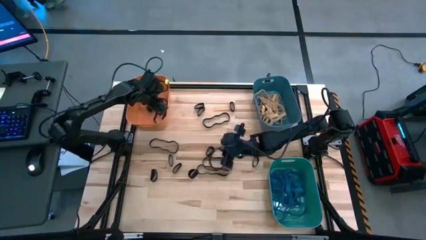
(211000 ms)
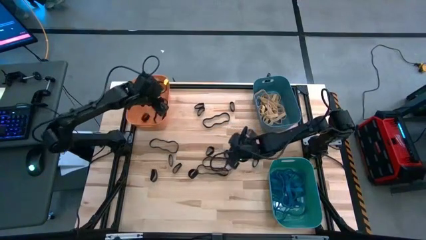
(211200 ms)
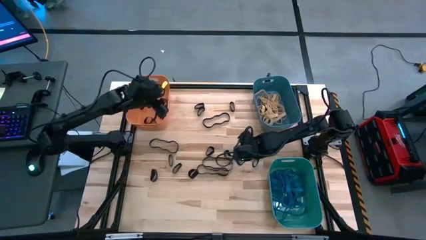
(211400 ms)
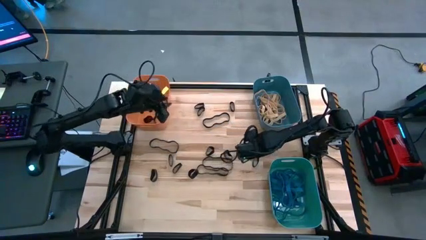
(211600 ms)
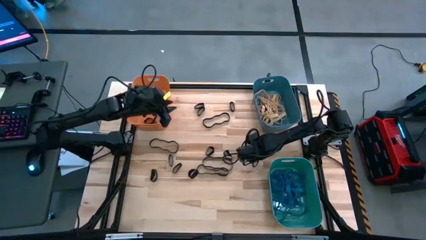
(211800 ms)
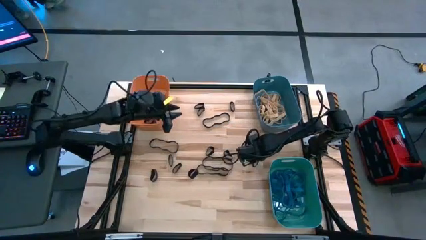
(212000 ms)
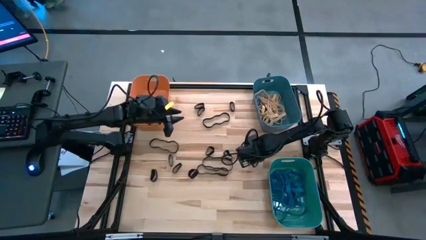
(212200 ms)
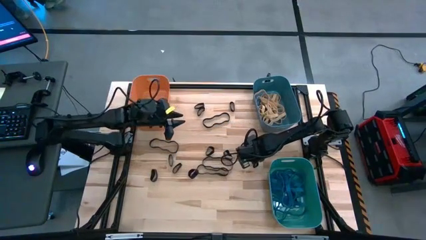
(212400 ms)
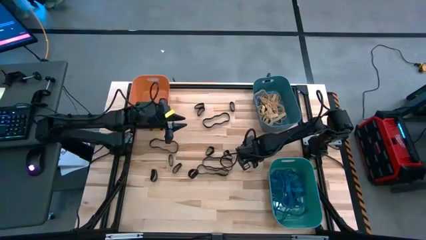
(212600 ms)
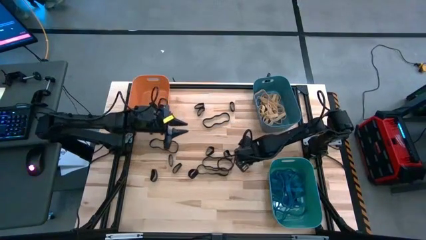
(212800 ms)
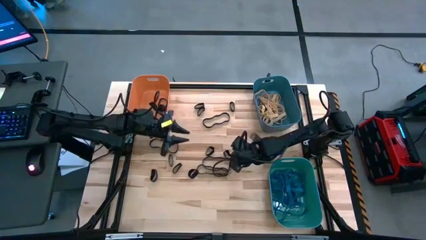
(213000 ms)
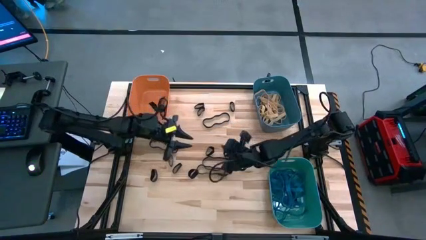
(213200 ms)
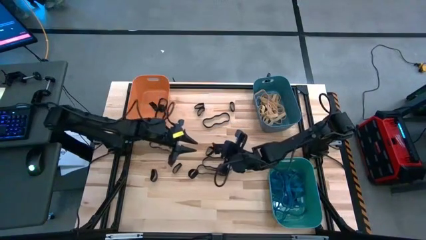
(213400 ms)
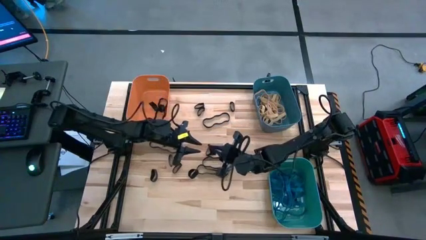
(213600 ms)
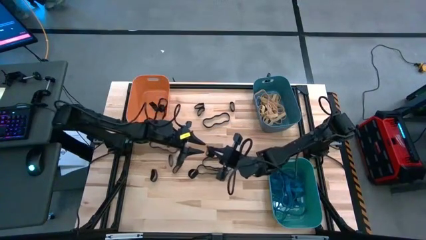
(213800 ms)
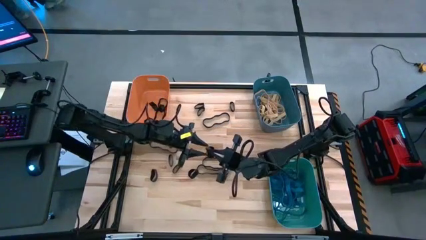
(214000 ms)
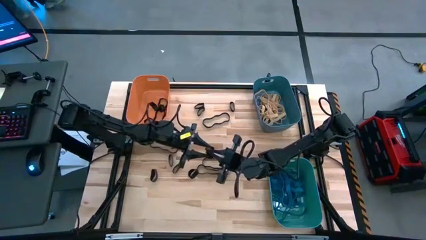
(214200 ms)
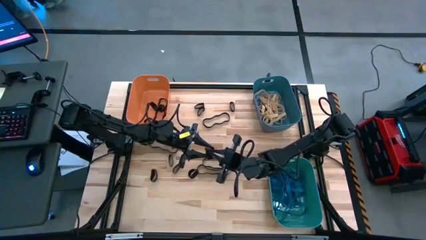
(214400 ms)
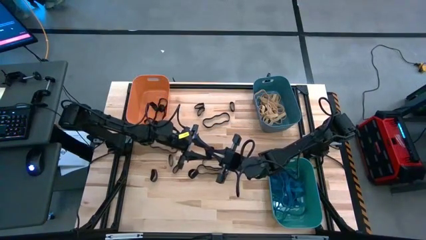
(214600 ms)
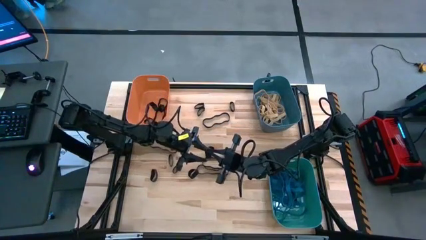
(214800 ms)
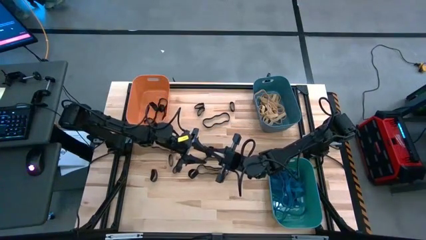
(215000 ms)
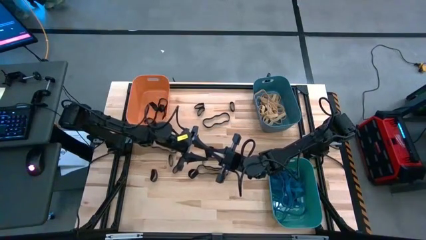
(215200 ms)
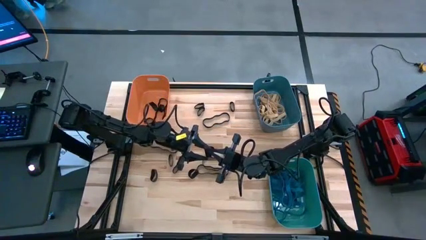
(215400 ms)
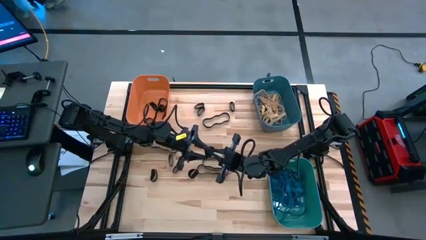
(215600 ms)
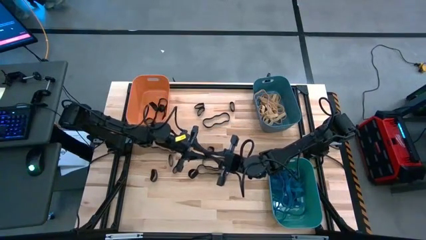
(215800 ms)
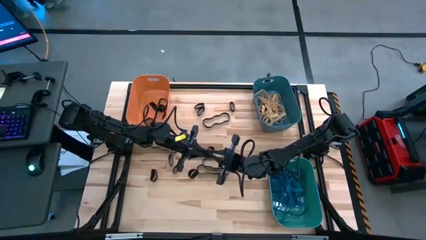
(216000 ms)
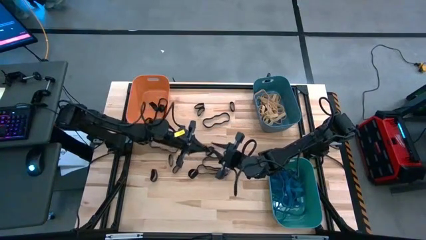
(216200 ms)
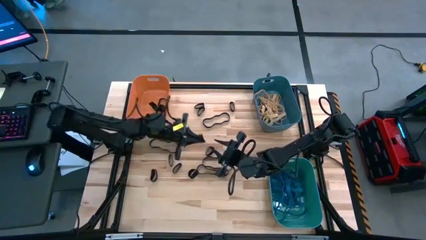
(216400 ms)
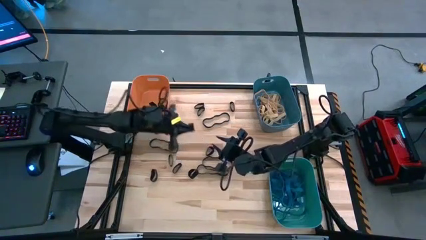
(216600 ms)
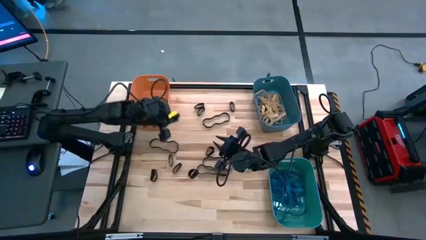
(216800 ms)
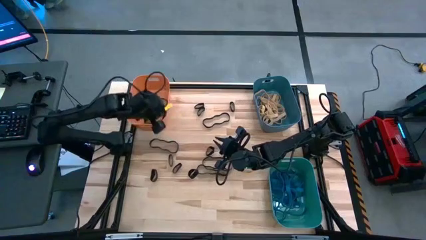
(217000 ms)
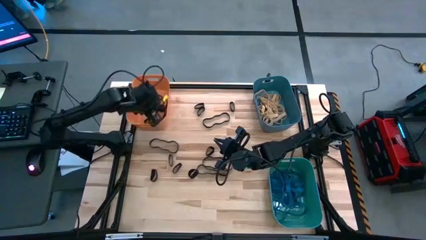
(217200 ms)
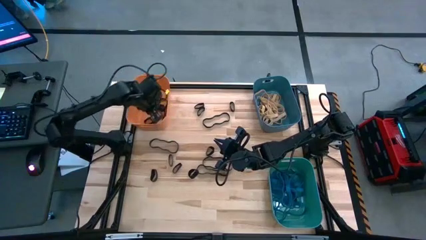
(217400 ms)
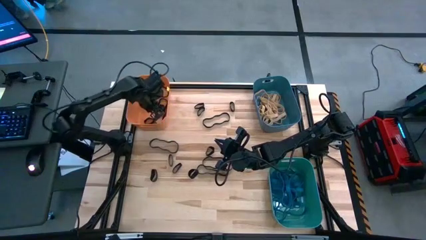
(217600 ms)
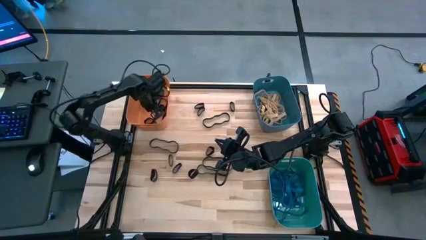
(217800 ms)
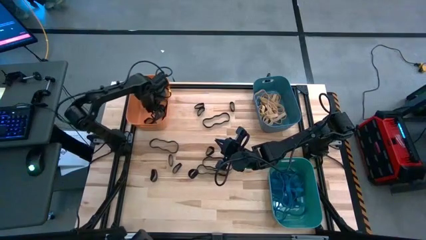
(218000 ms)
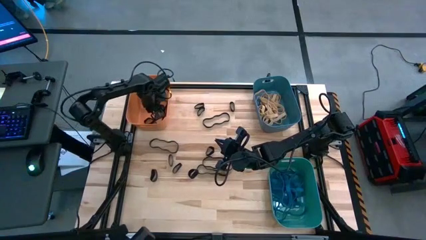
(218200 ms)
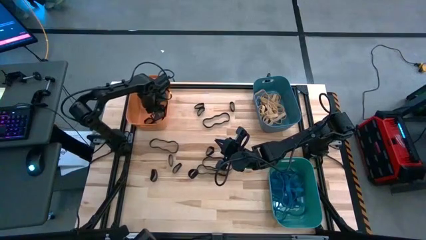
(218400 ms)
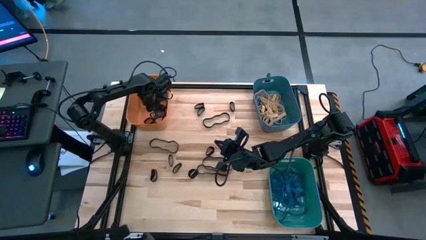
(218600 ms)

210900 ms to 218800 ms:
Task: Sort rubber bands into baskets
Put the black rubber band into the orange bin

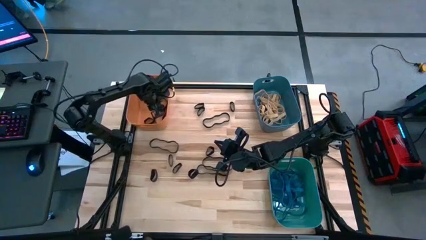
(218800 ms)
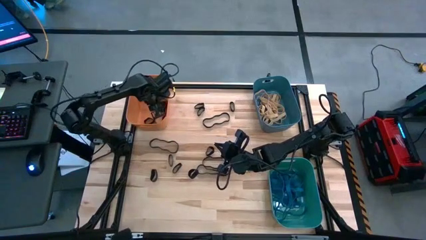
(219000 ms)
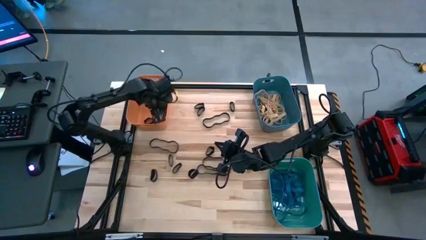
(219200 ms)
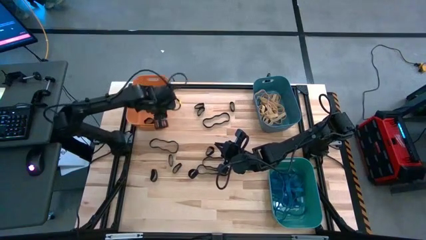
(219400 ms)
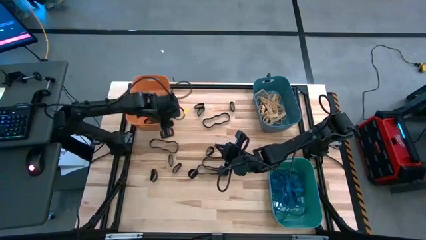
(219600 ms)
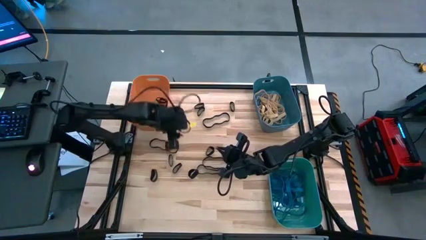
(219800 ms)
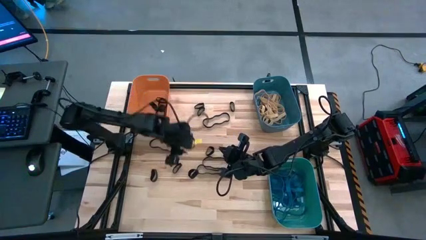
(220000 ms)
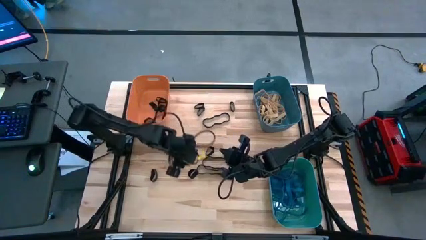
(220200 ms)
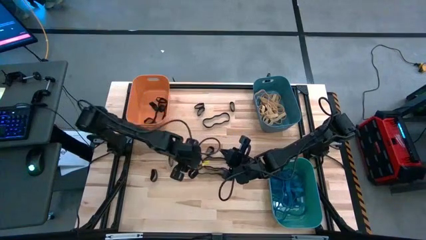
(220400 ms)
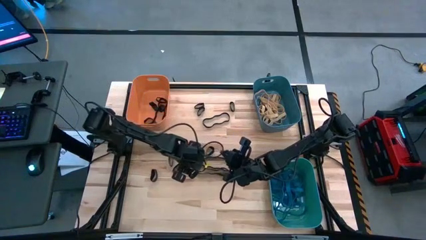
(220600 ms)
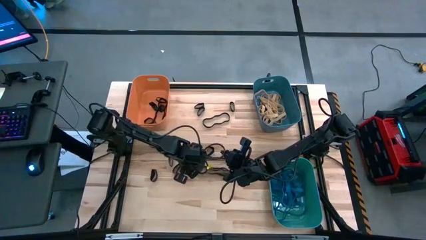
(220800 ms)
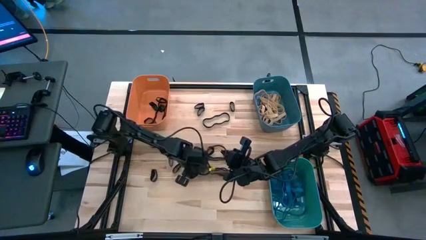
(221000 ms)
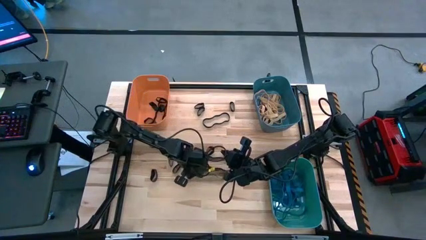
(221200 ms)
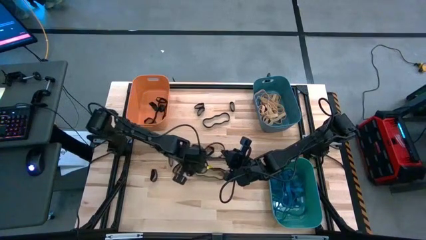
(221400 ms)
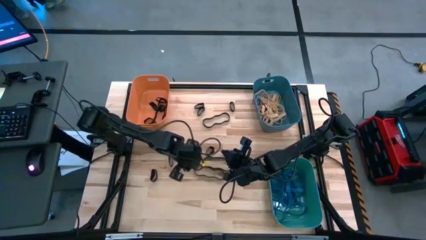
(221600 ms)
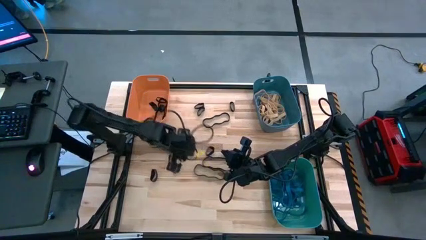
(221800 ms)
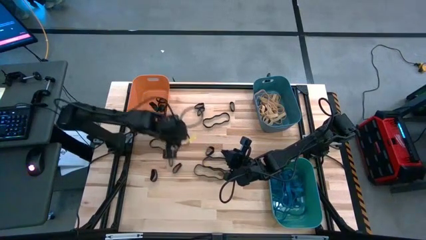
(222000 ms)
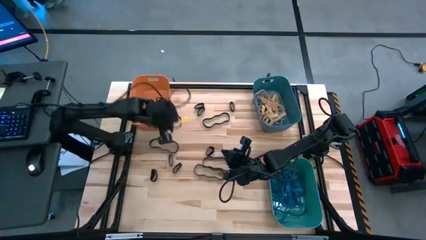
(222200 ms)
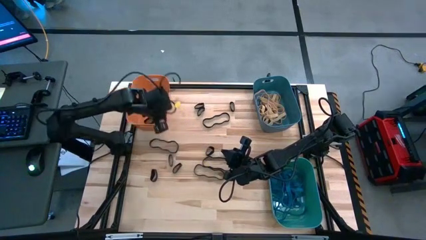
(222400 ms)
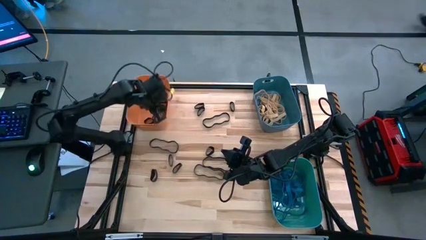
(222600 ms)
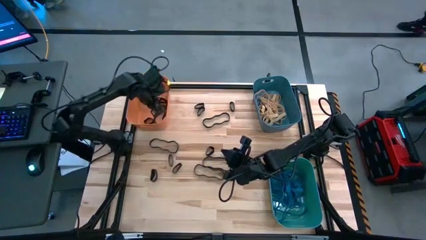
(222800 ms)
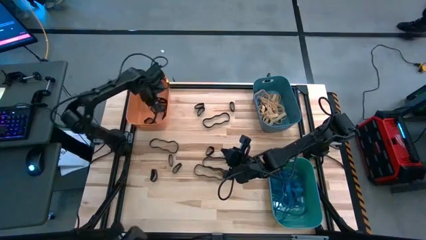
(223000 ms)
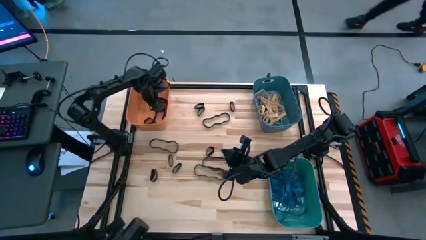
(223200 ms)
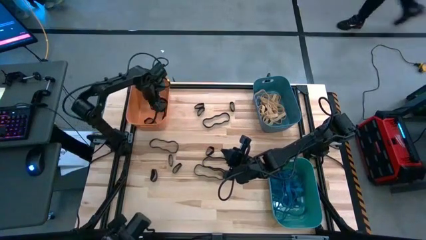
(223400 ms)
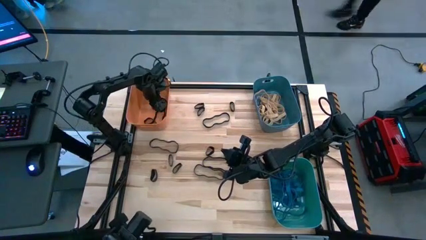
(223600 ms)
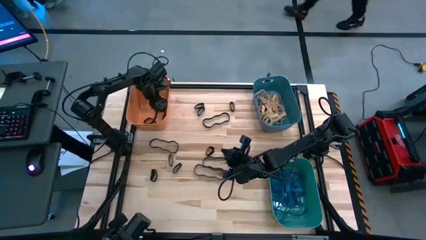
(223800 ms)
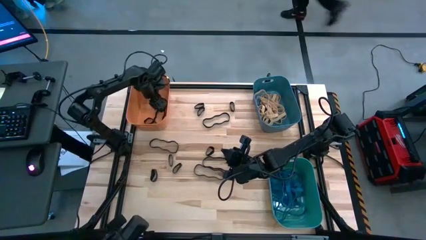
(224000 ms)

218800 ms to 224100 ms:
Put the black rubber band into the orange bin

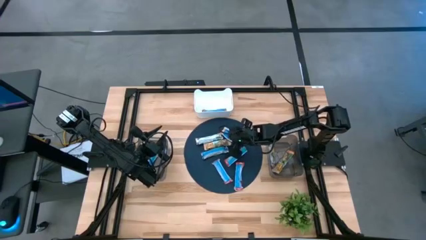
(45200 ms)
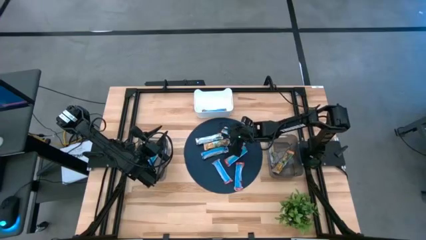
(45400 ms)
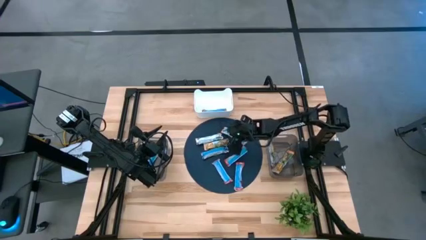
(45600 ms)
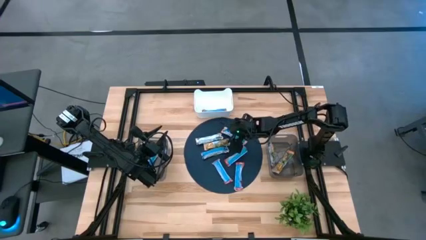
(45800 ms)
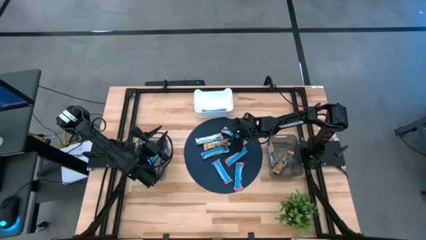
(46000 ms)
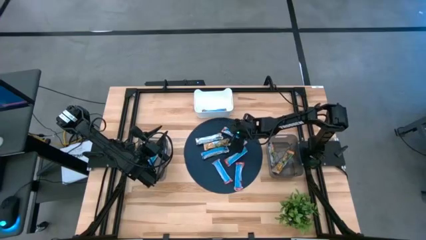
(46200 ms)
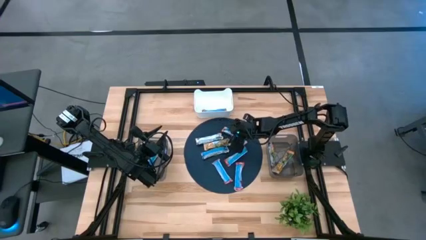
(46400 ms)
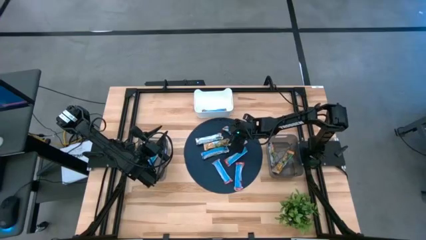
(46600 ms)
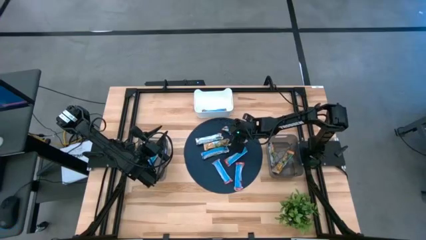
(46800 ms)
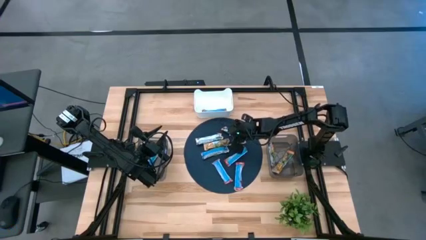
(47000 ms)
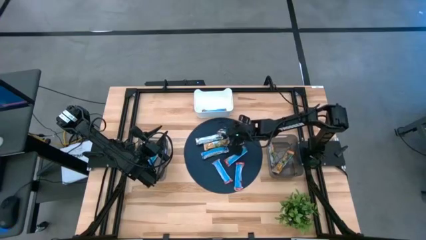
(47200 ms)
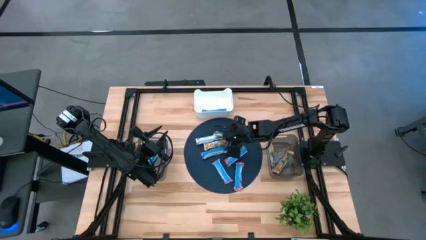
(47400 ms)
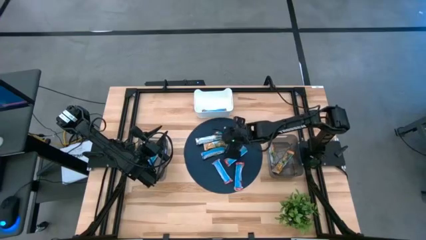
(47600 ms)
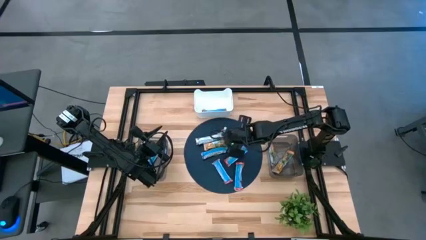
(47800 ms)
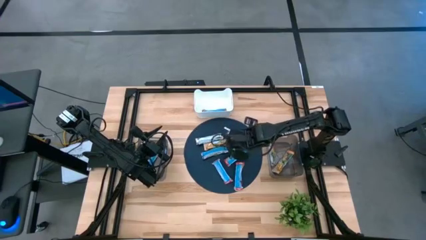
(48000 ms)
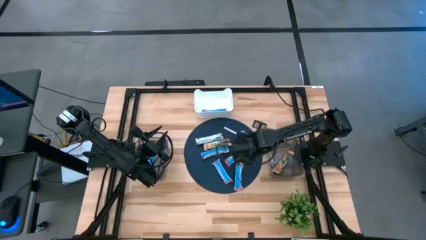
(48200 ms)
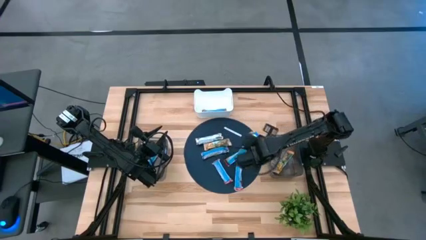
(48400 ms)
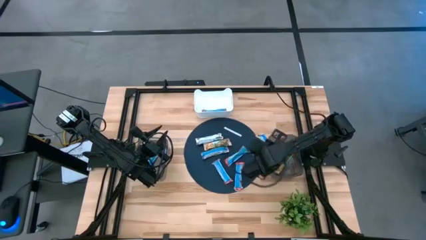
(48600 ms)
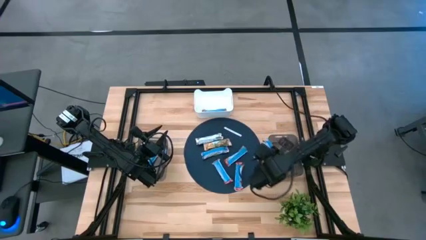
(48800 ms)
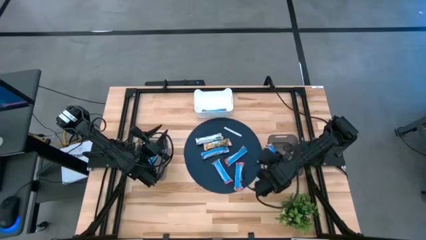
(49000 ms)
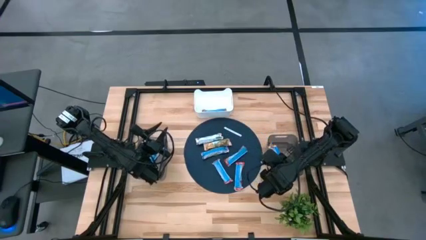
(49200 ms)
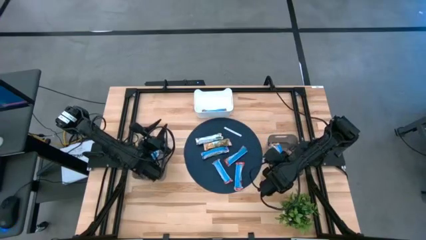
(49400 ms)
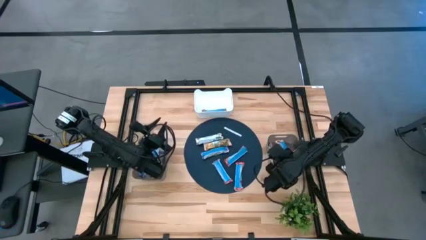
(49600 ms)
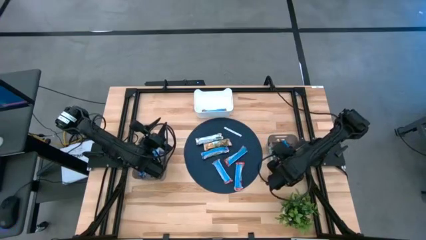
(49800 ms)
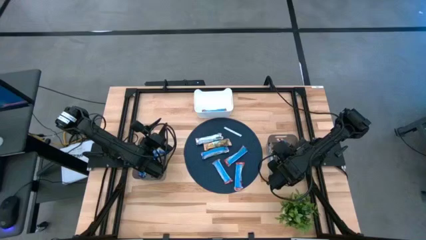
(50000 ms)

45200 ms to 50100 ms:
Task: Pick and place Granola Bars by type
Put the orange granola bar into the right black bin
